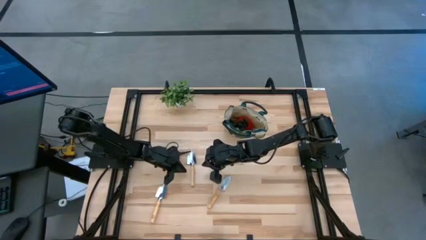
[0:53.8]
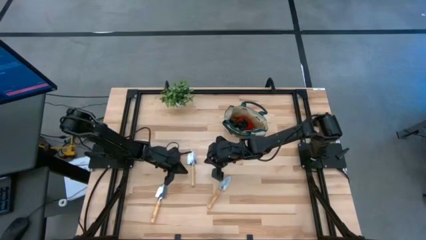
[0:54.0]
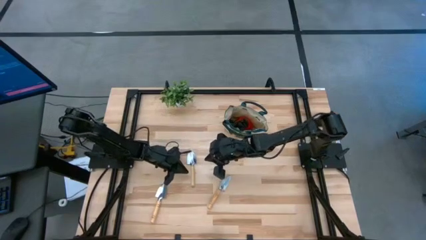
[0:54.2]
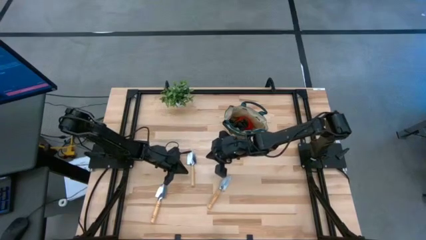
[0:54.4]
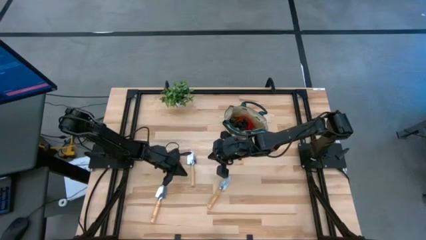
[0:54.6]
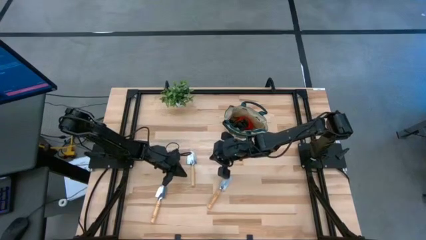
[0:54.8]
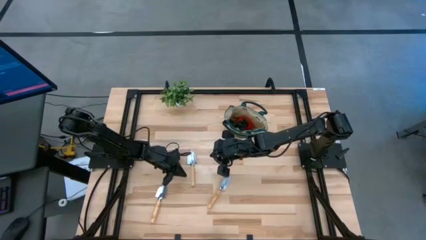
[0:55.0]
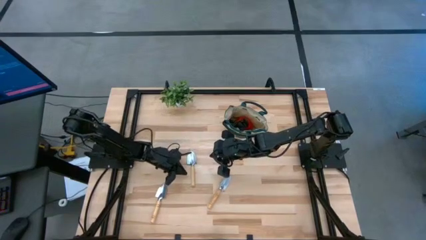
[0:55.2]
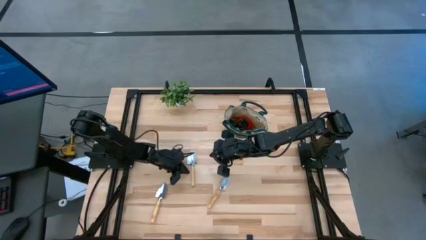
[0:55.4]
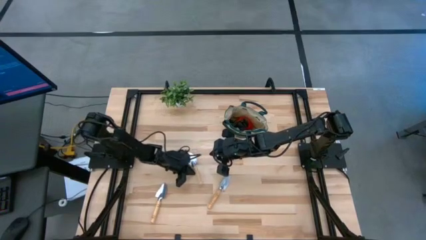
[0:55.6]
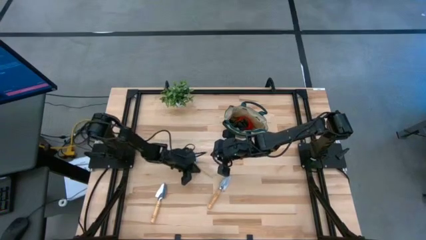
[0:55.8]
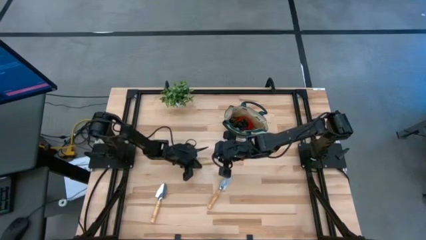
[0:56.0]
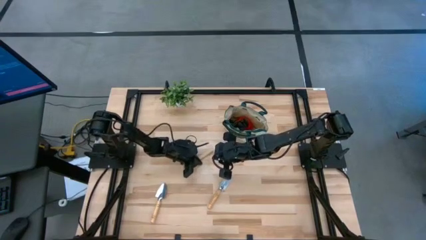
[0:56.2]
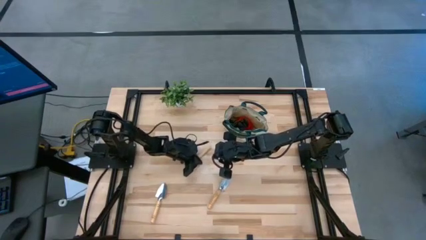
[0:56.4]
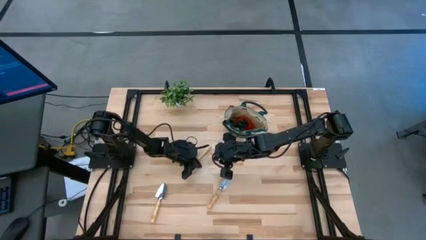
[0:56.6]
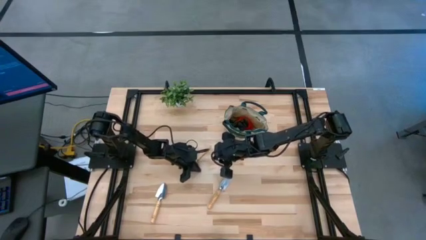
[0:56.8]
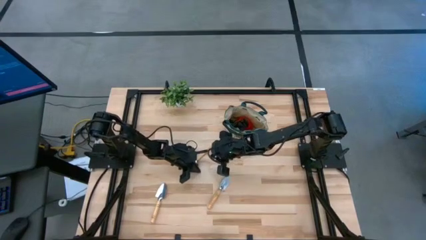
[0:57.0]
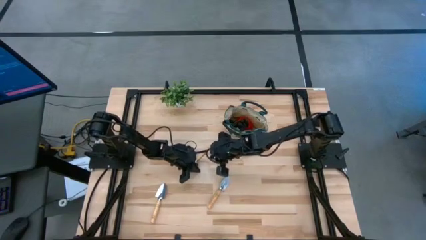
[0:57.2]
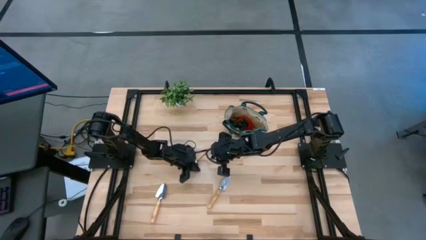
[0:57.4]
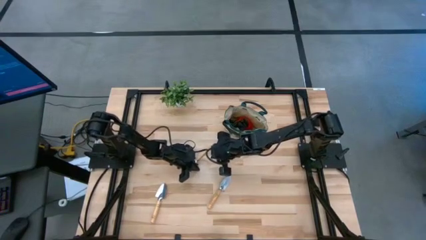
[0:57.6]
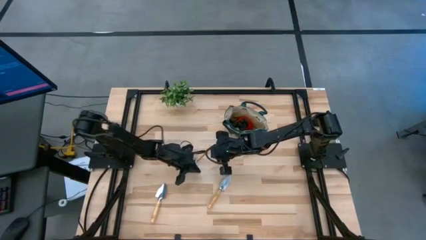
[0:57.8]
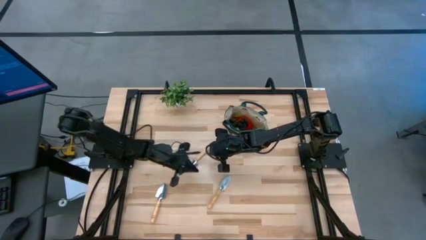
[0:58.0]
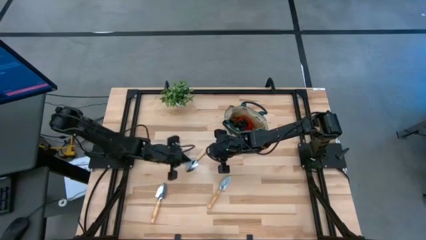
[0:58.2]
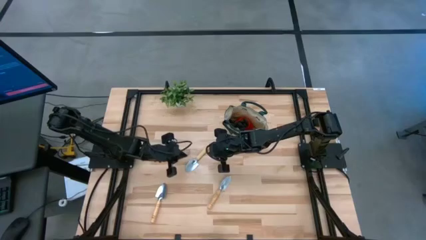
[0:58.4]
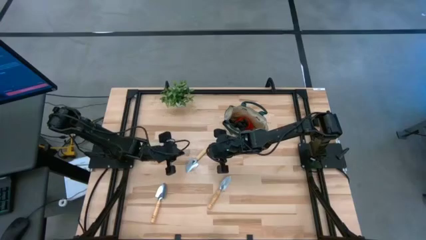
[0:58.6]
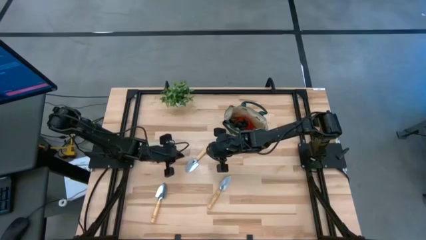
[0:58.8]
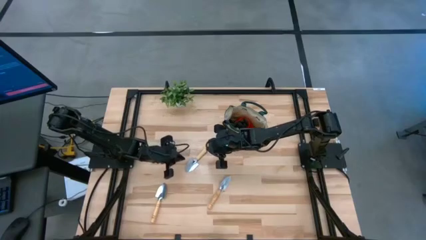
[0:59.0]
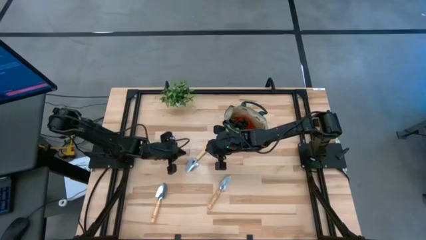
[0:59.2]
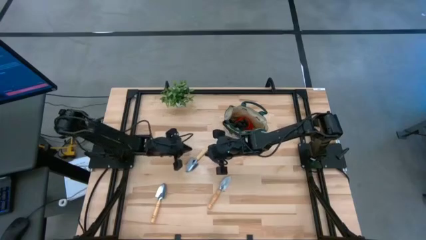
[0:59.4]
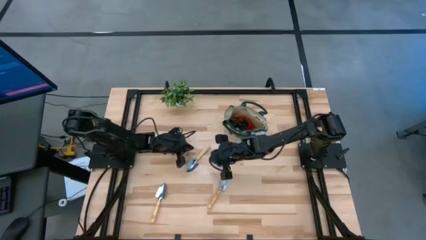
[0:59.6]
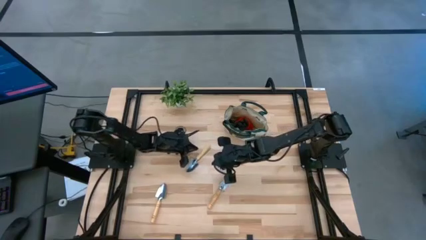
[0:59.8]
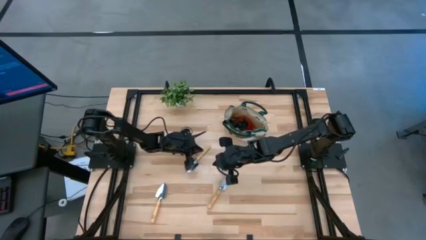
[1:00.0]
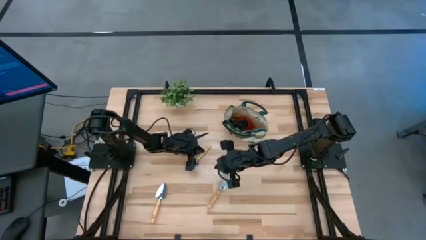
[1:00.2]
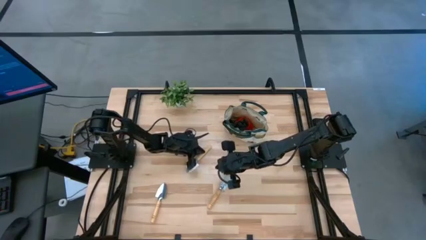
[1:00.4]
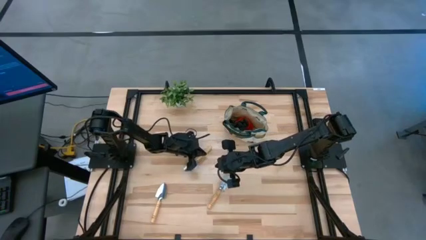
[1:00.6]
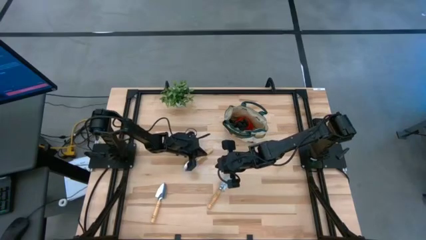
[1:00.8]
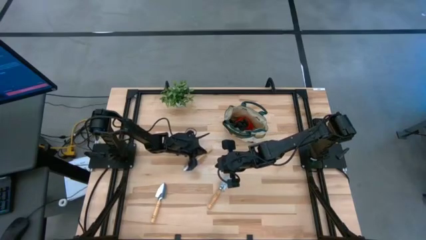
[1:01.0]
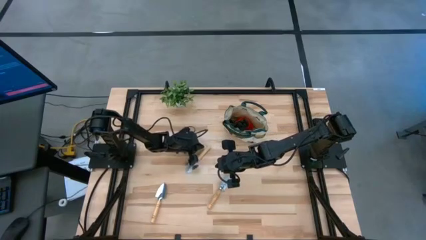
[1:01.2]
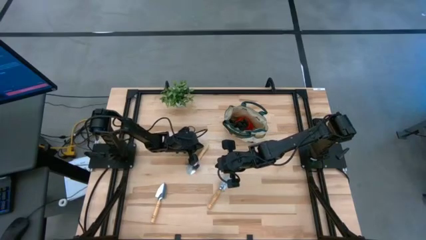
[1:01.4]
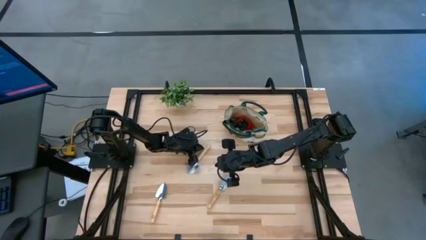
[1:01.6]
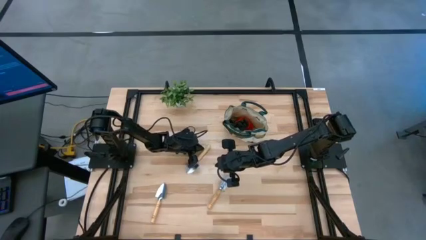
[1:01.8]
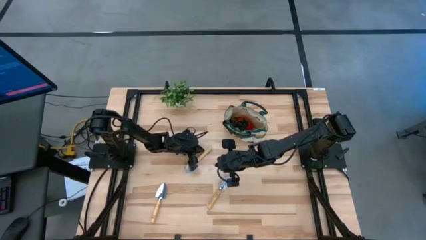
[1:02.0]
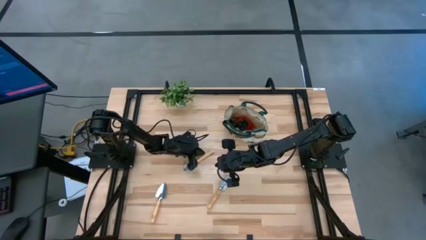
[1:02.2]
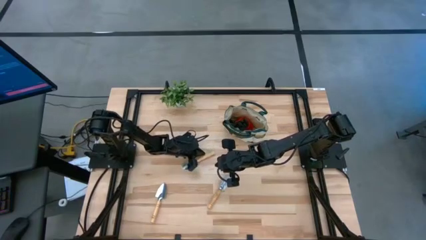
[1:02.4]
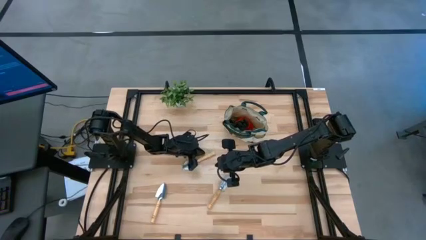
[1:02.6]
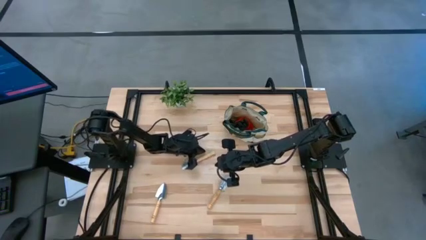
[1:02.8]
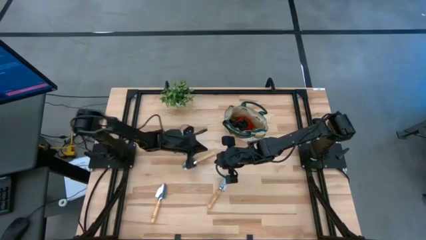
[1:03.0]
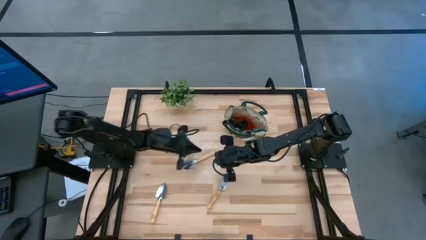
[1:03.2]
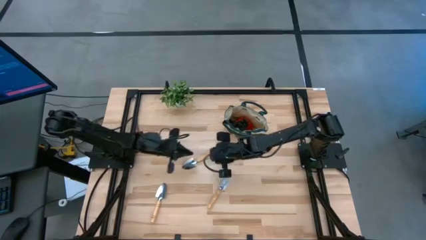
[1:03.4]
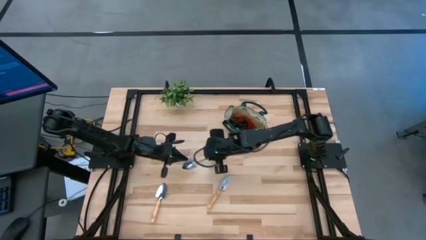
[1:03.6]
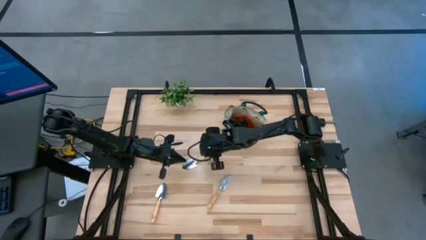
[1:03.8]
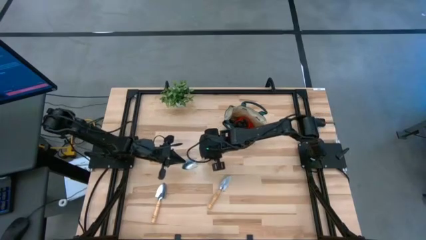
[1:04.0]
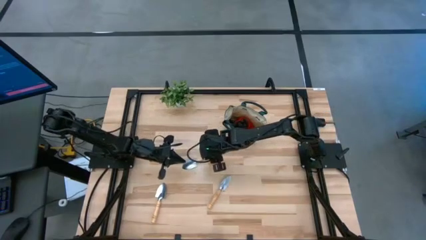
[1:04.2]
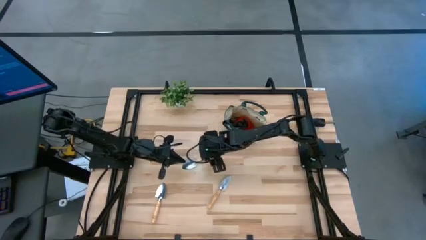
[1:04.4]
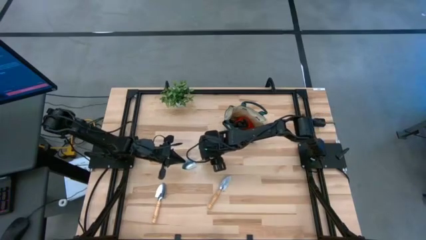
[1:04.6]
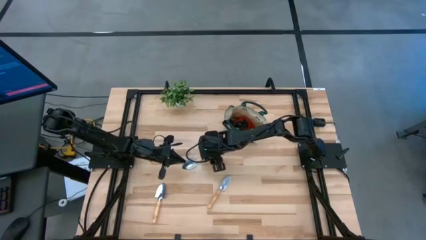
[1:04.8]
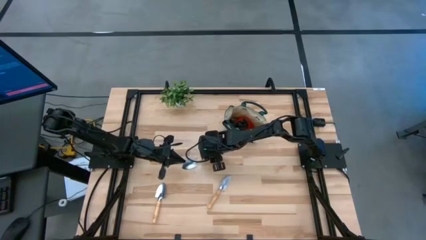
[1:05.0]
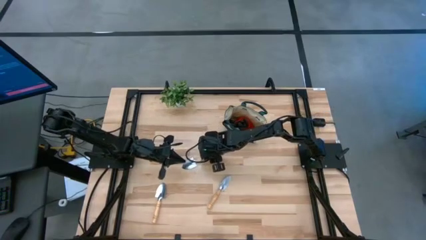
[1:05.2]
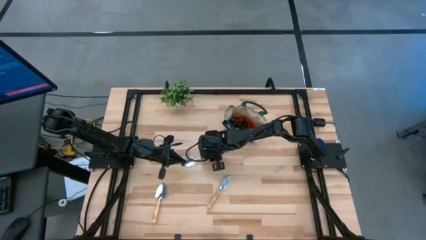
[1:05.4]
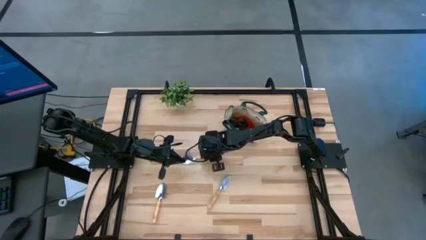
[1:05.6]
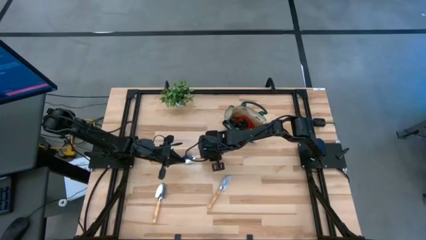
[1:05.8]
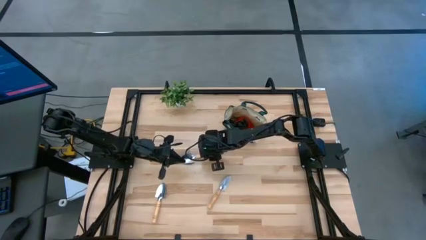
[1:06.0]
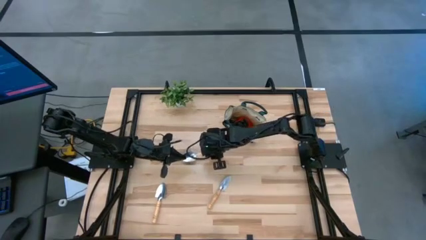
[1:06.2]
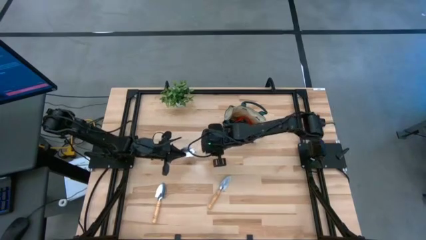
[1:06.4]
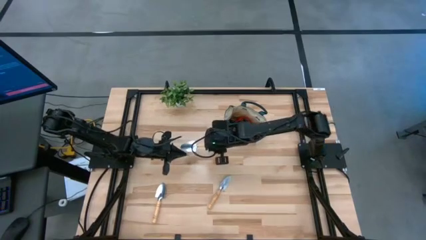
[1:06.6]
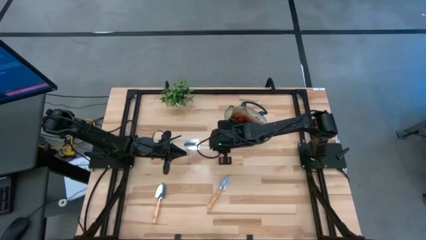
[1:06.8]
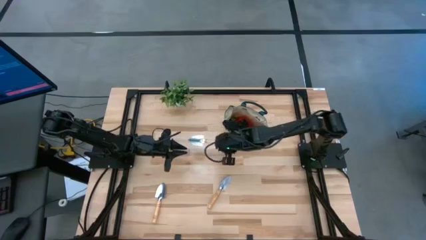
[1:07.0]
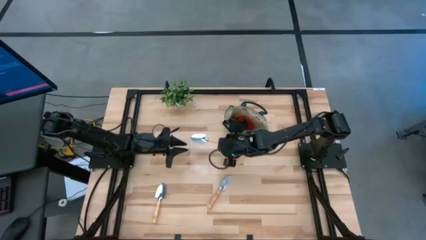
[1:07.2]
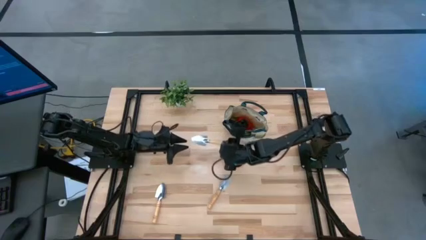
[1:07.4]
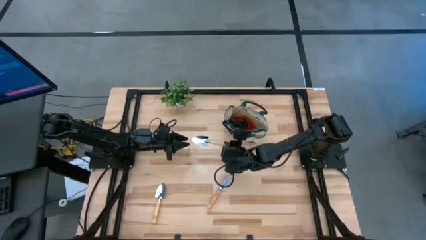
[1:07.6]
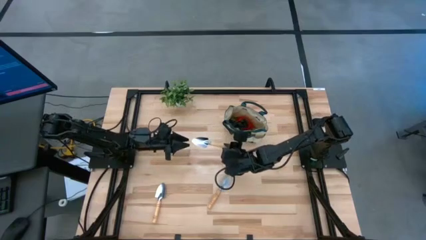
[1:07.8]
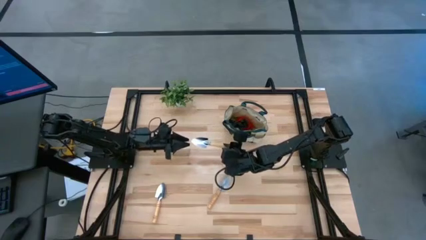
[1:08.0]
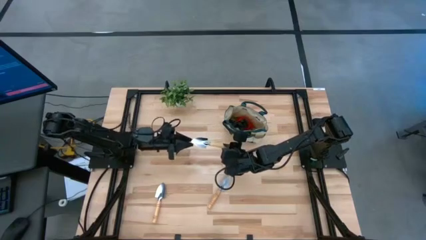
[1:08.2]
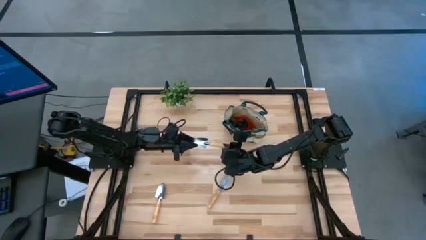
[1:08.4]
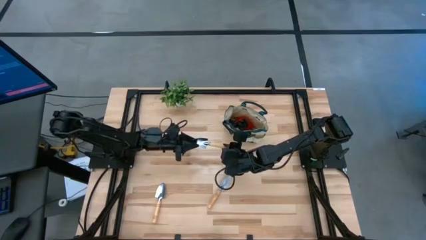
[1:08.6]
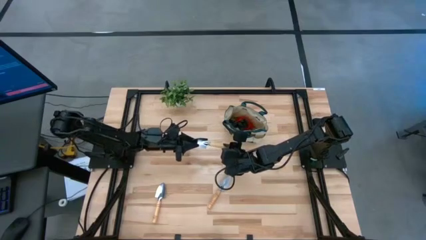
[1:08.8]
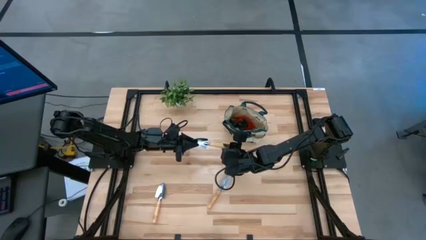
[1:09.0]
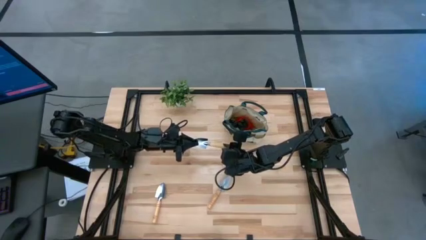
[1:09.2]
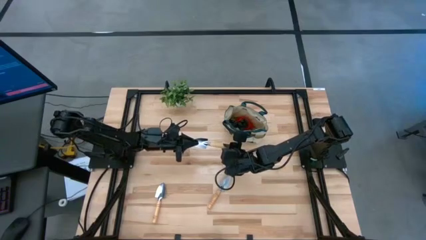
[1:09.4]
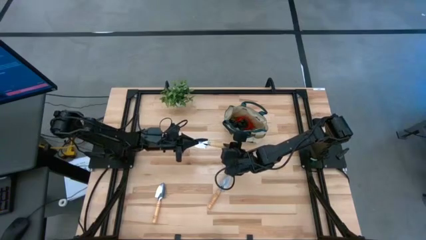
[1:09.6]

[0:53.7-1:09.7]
Task: Pick & Place Garden tools in Gardening bag
Put the trowel into the gardening bag
